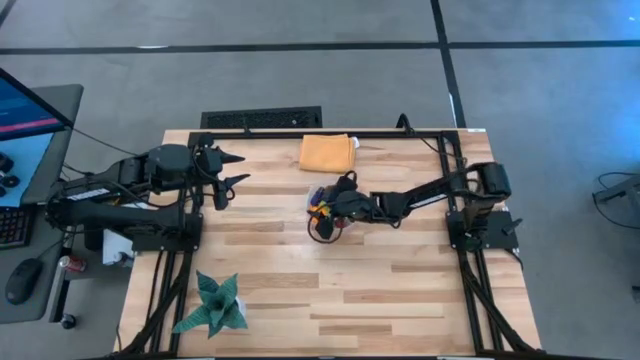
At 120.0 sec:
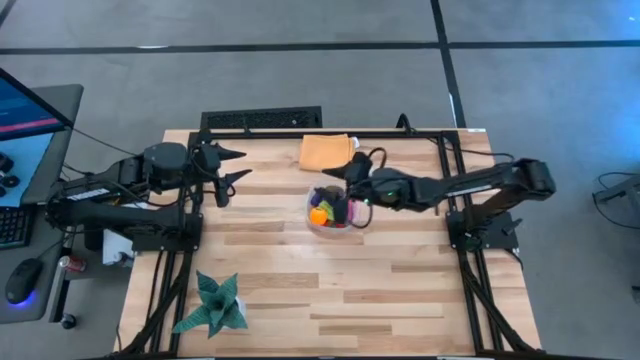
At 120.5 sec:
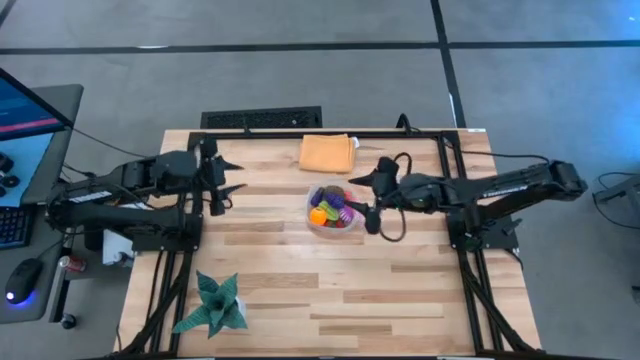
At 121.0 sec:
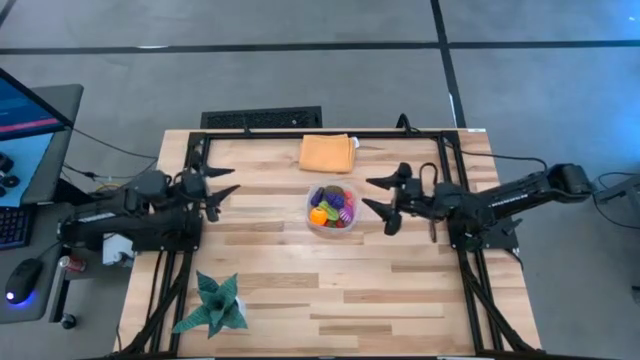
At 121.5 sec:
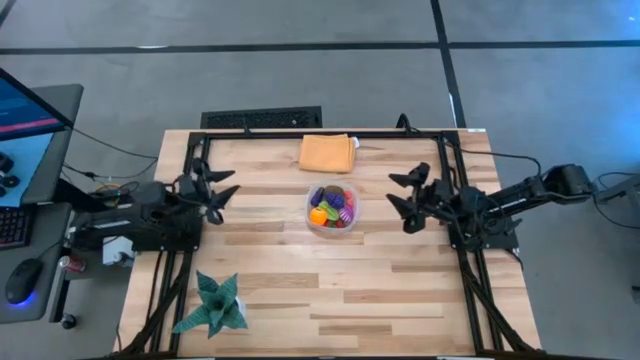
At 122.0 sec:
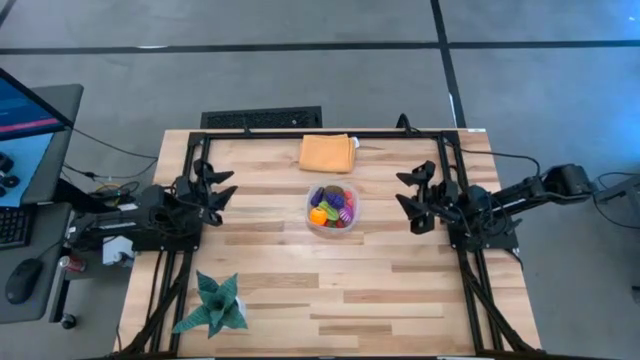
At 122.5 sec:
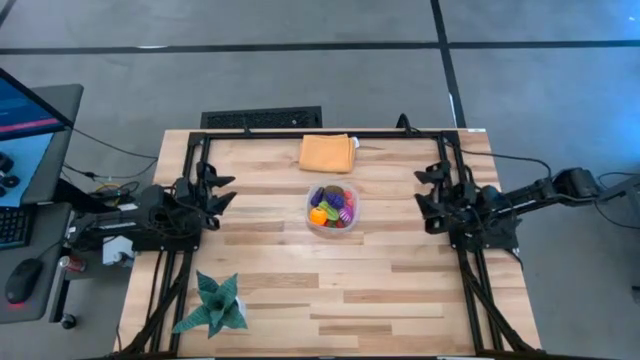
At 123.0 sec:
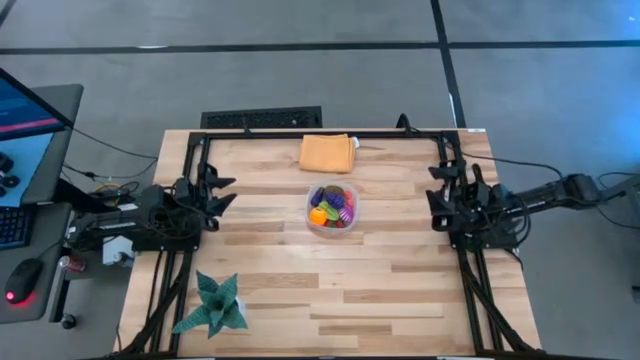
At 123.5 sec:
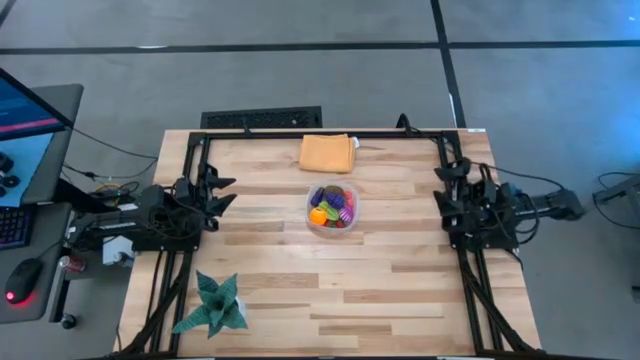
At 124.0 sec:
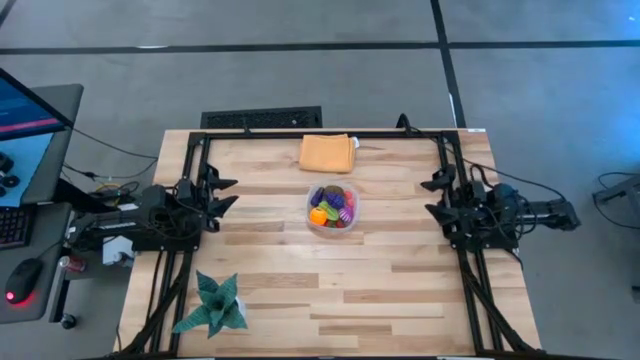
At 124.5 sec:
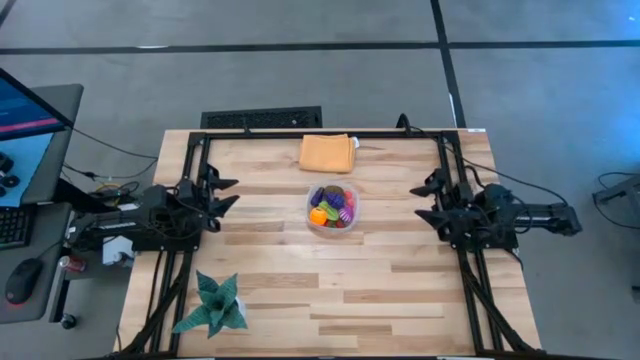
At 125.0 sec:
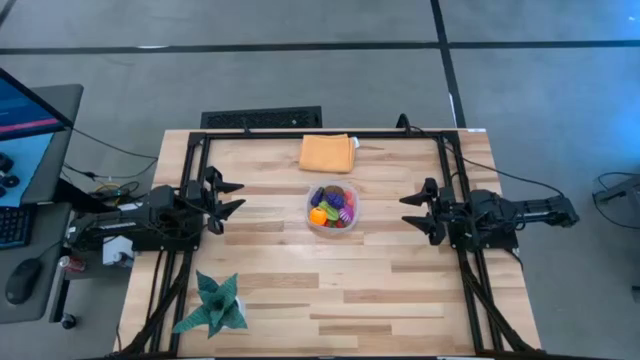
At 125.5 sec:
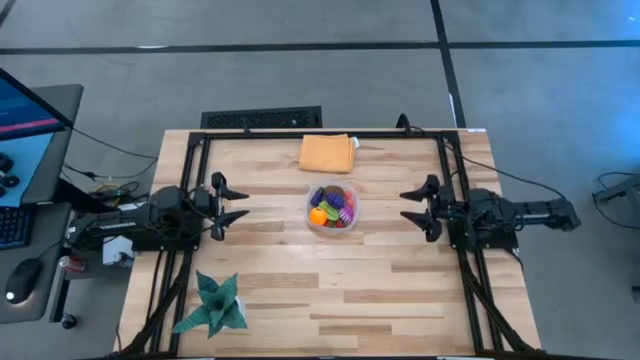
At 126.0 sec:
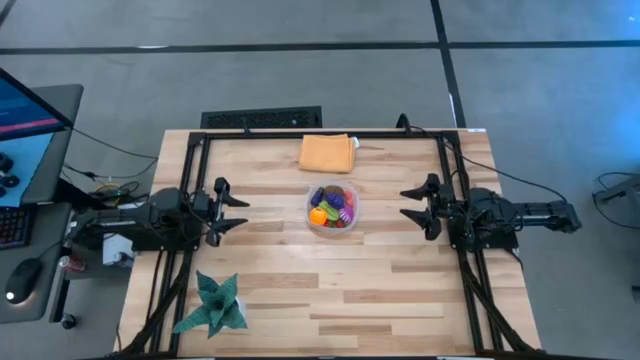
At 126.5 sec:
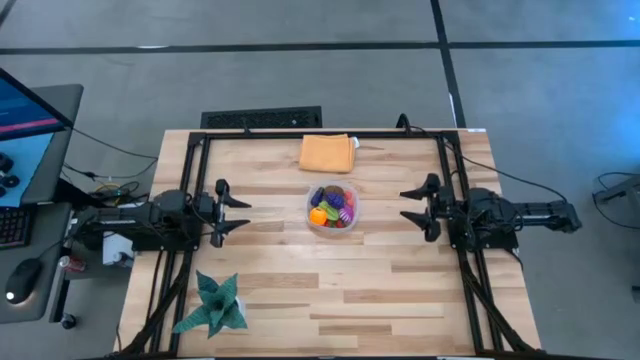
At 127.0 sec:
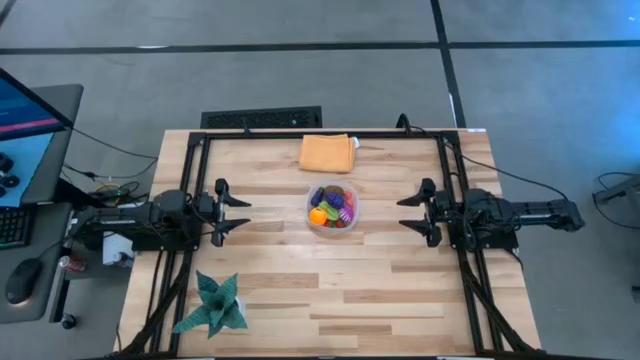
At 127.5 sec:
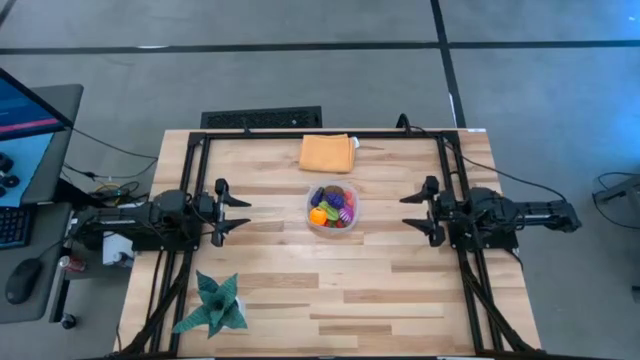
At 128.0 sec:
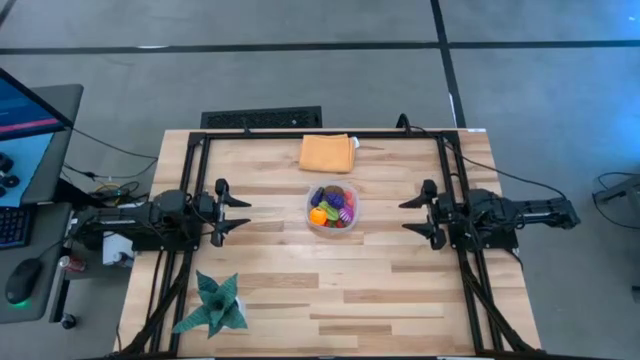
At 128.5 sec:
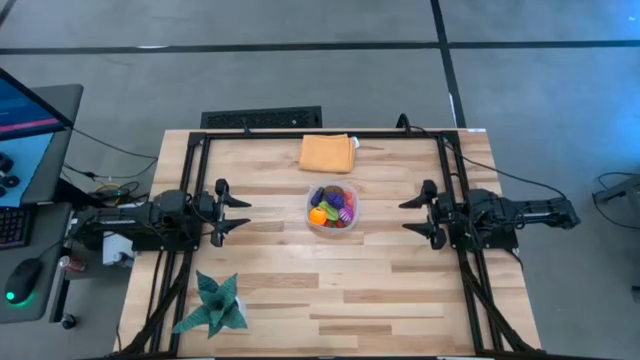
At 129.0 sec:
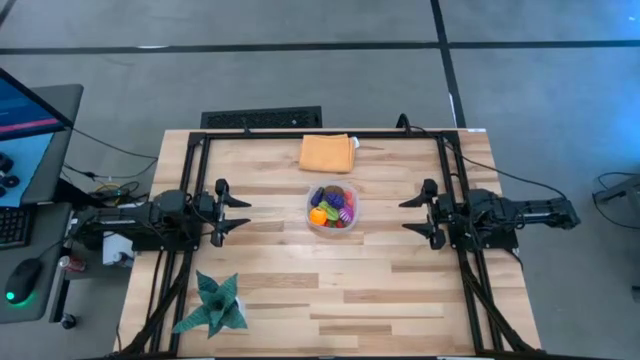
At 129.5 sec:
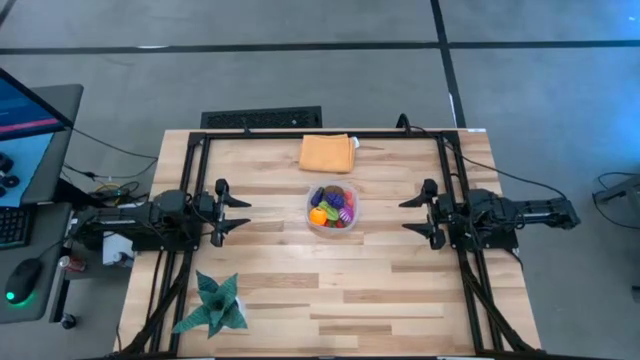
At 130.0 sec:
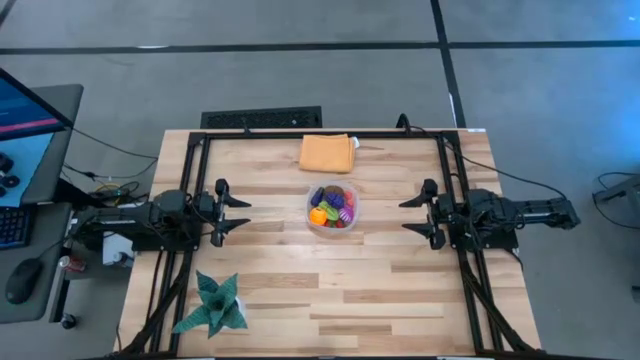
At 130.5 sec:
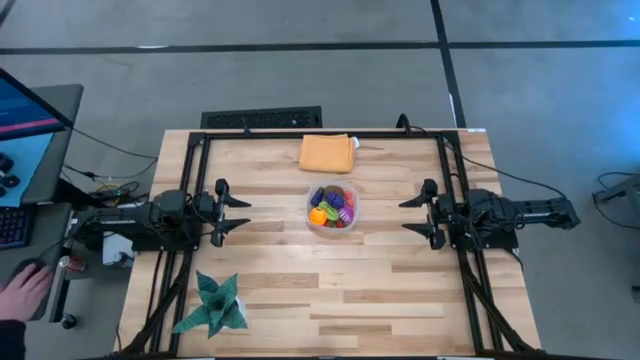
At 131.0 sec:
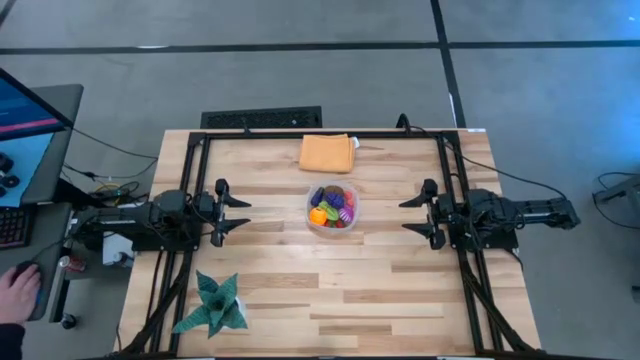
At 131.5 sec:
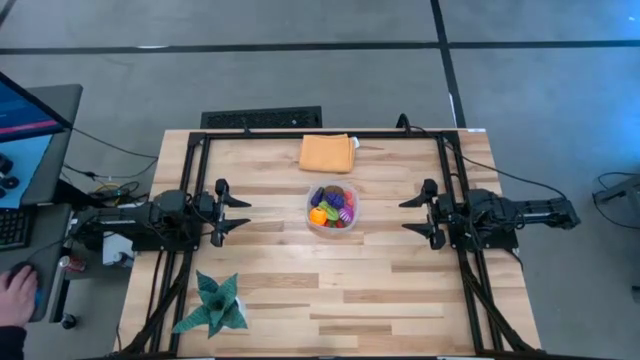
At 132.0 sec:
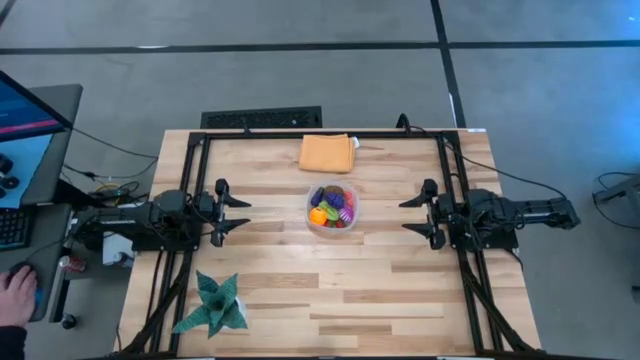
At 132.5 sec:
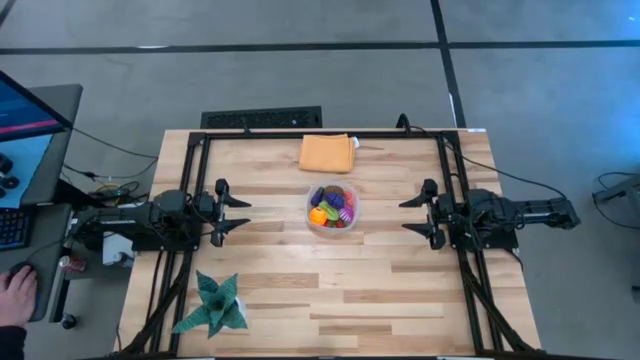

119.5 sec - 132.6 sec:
Task: Pick and placing Produce into tupperware
Return to Home Position

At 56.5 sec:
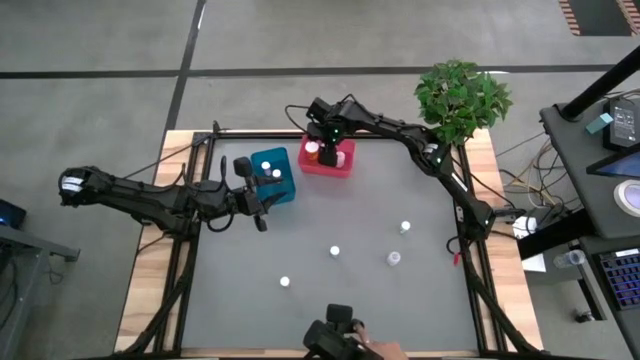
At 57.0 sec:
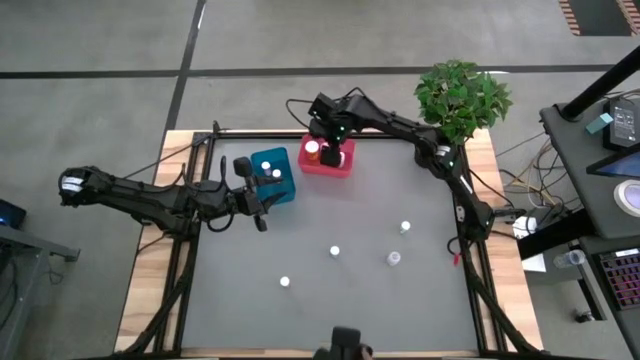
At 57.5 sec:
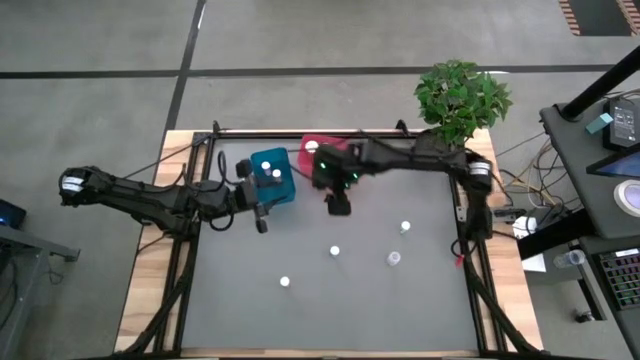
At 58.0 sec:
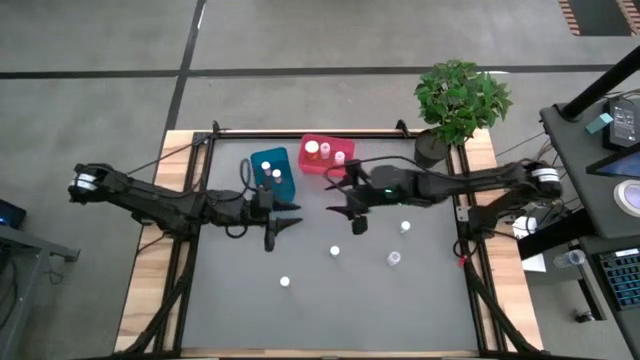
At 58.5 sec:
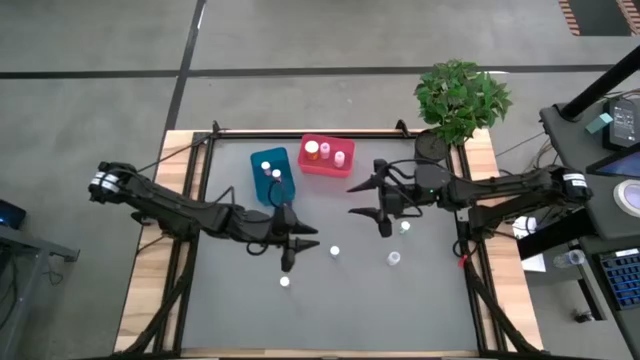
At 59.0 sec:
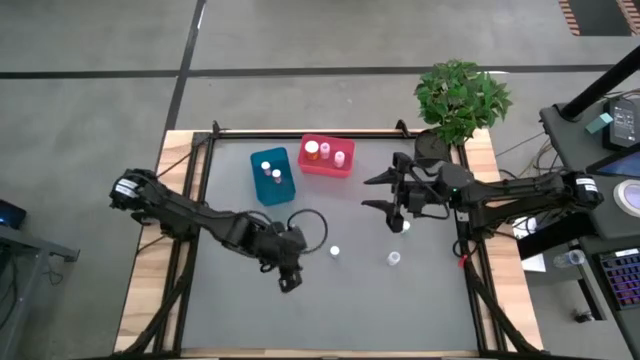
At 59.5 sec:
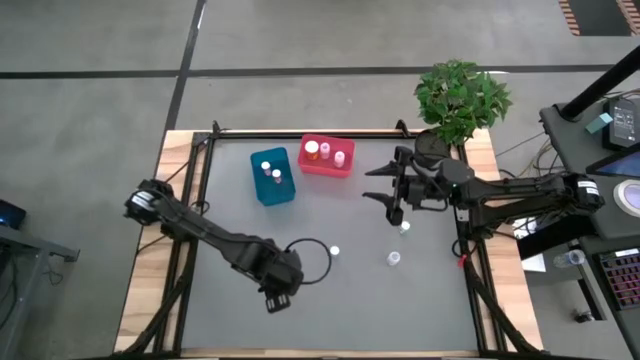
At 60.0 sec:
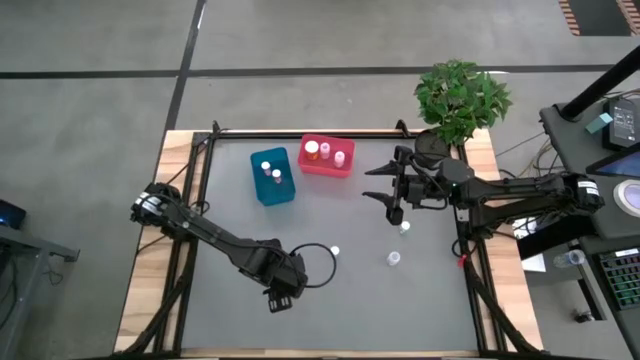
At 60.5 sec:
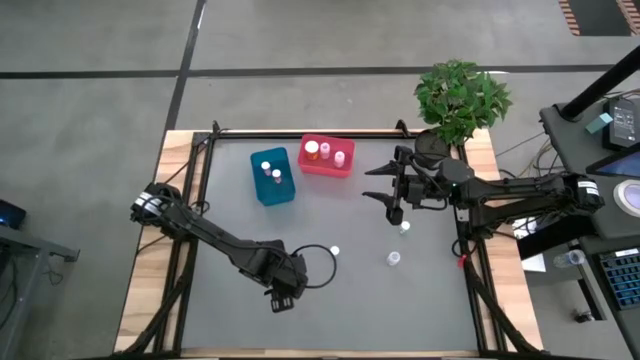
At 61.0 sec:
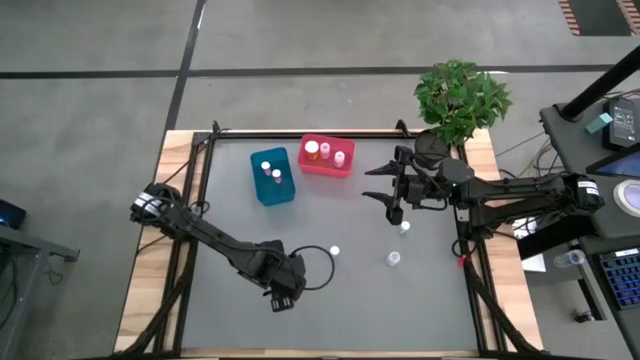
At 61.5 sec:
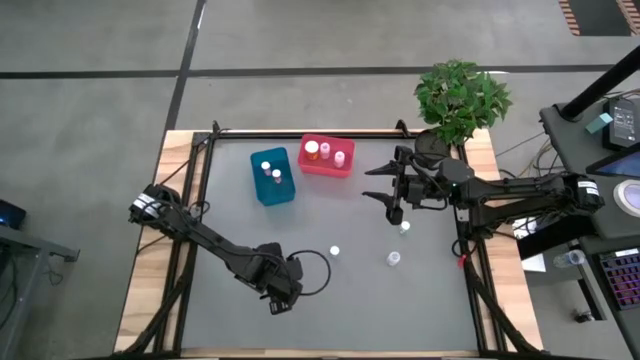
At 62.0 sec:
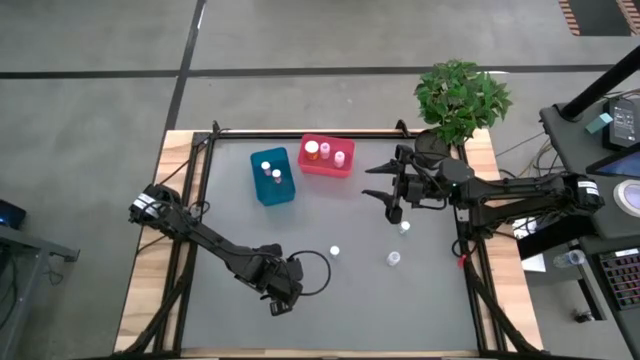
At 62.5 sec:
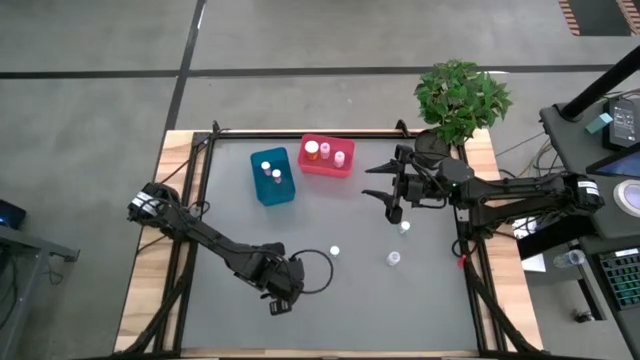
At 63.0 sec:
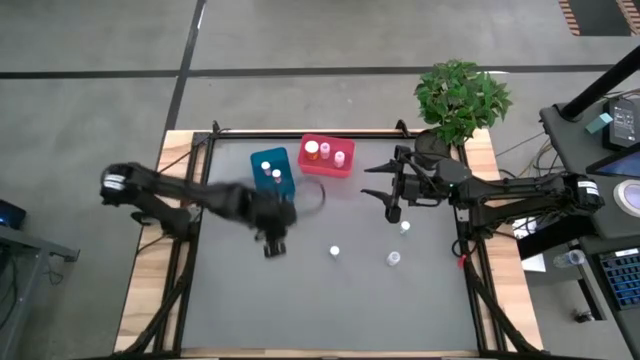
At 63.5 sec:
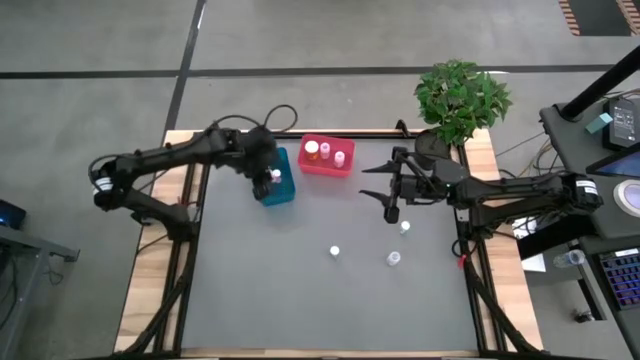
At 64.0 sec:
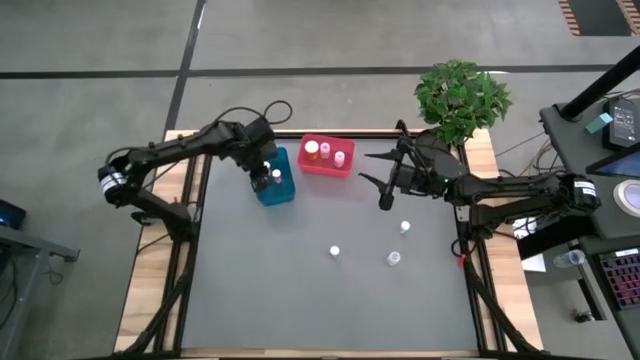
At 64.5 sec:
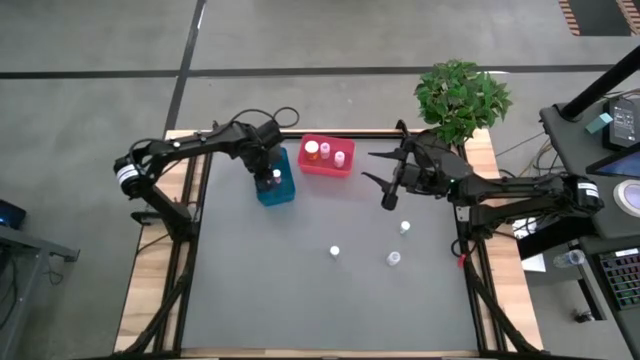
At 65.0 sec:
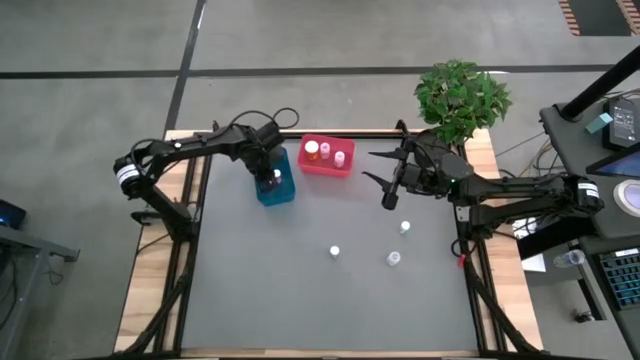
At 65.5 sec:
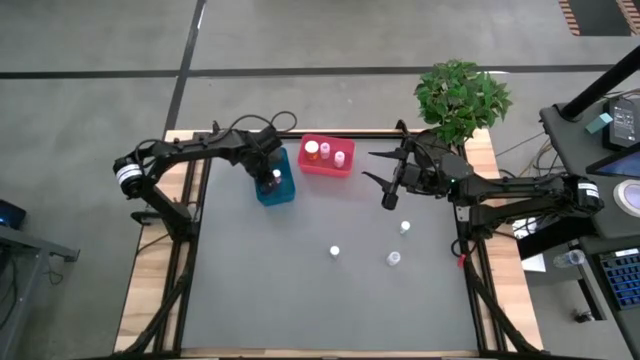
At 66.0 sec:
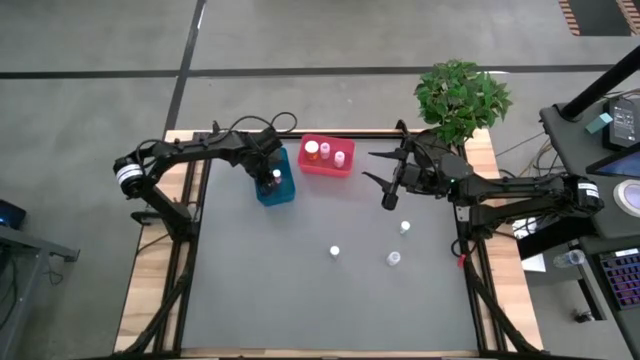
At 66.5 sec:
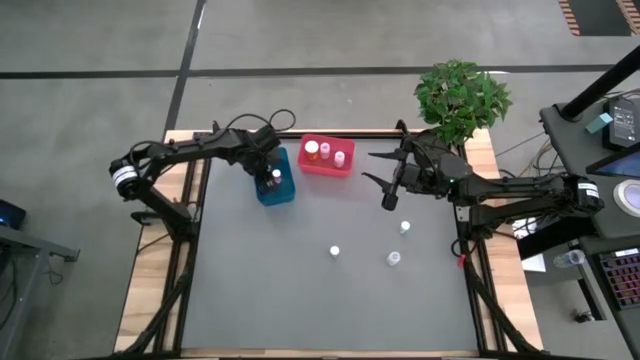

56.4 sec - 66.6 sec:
Task: Pick and place medicine bottles into bin by pill shape (circle, oval)
Put the violet tablet bottle into the blue bin
